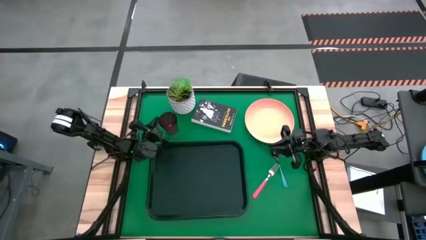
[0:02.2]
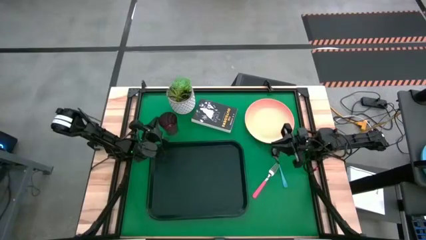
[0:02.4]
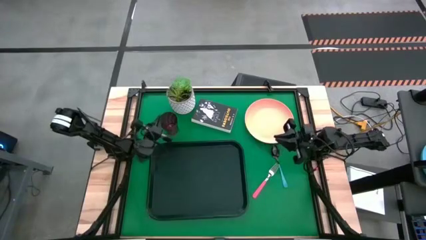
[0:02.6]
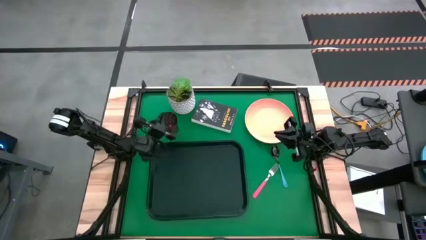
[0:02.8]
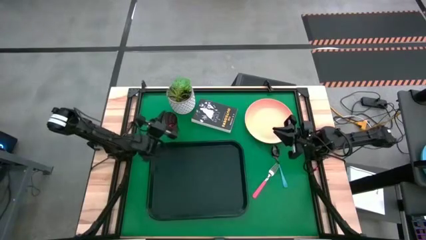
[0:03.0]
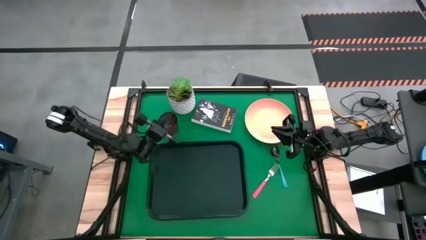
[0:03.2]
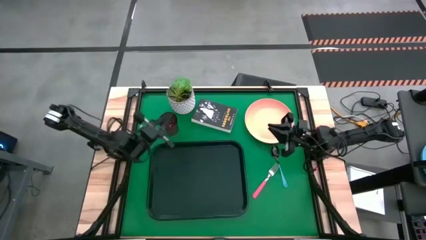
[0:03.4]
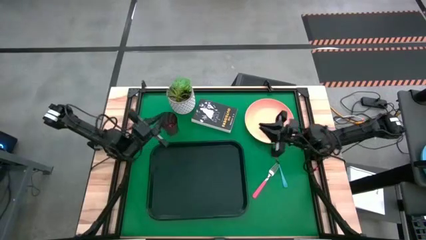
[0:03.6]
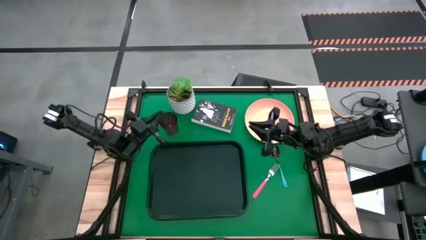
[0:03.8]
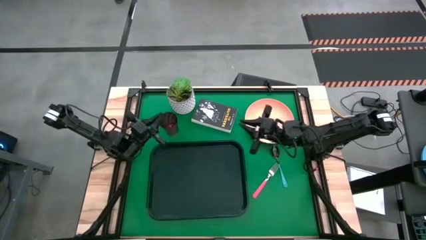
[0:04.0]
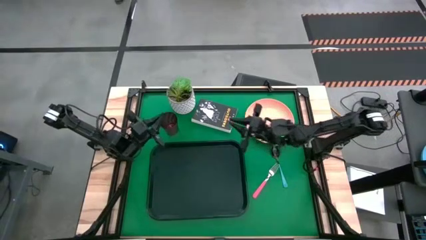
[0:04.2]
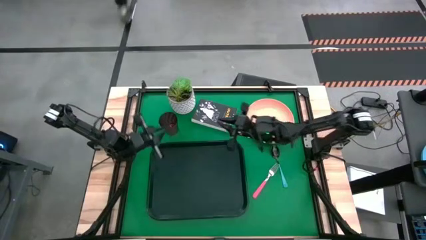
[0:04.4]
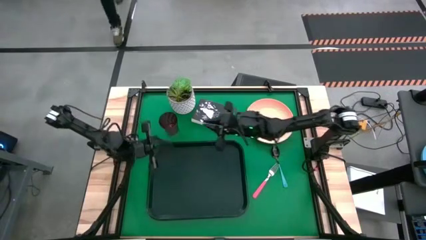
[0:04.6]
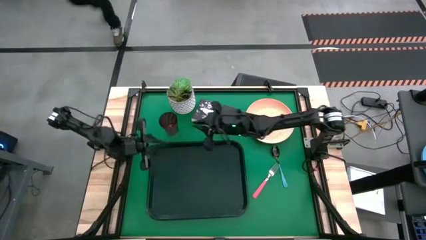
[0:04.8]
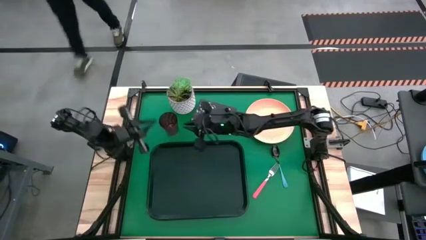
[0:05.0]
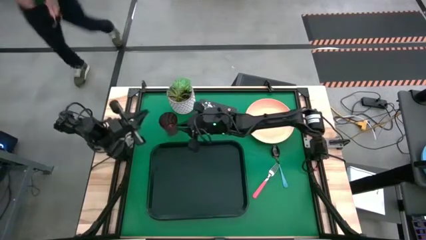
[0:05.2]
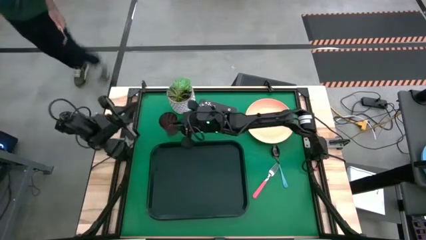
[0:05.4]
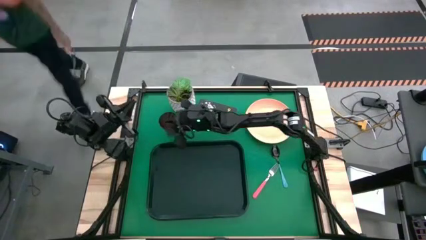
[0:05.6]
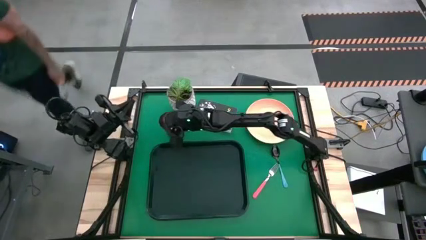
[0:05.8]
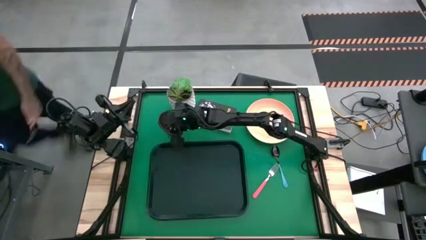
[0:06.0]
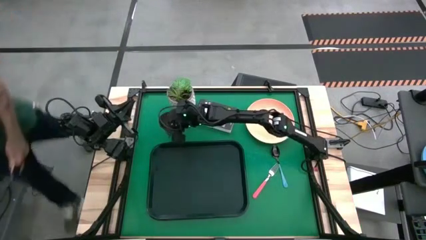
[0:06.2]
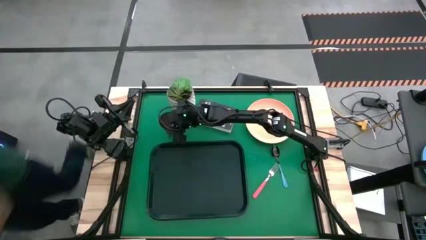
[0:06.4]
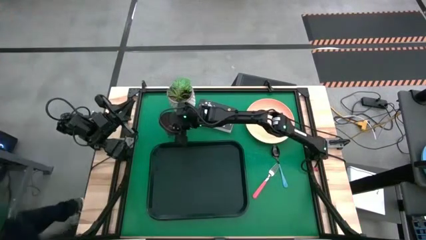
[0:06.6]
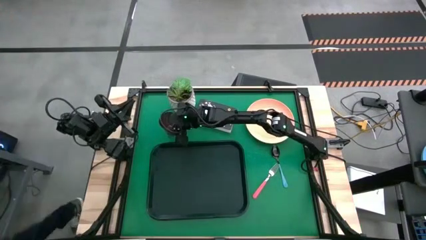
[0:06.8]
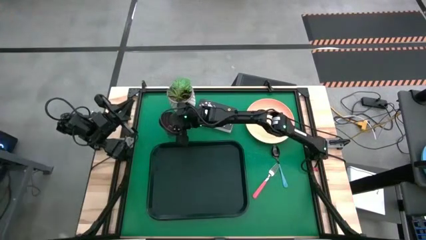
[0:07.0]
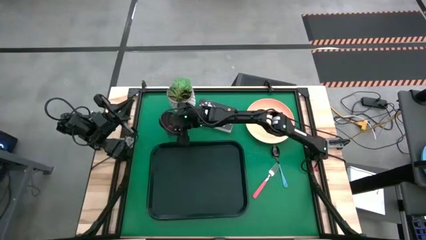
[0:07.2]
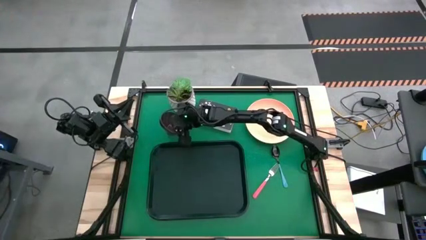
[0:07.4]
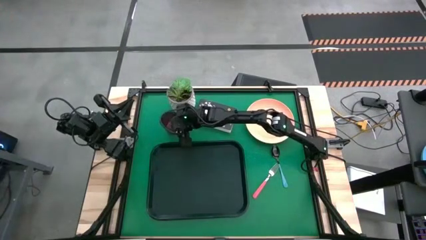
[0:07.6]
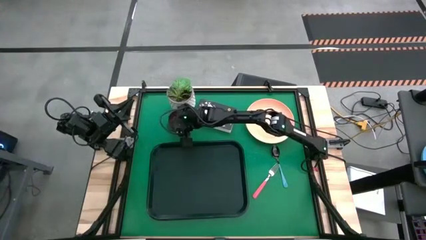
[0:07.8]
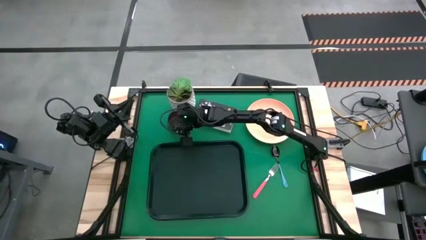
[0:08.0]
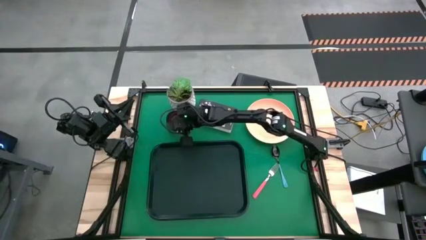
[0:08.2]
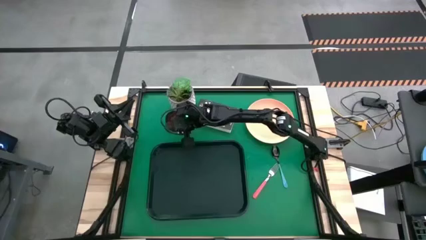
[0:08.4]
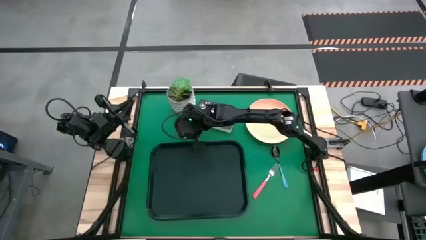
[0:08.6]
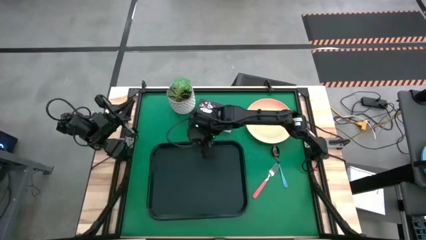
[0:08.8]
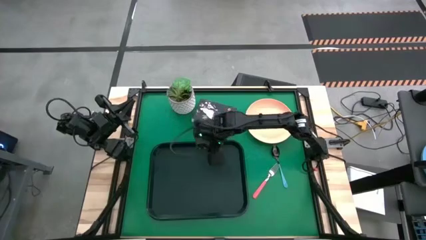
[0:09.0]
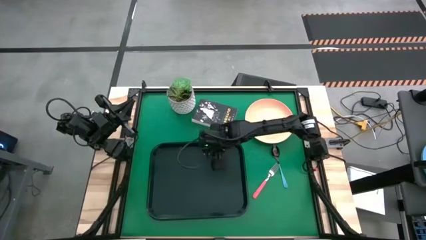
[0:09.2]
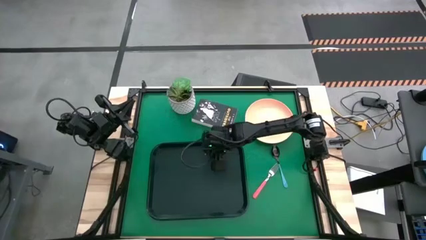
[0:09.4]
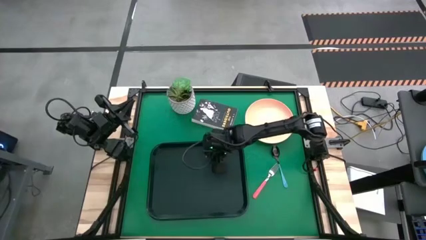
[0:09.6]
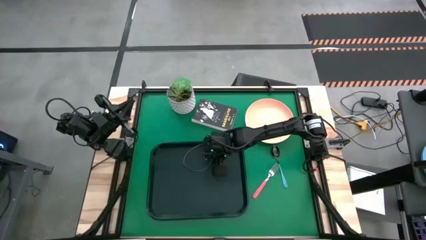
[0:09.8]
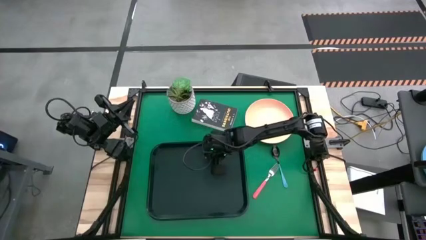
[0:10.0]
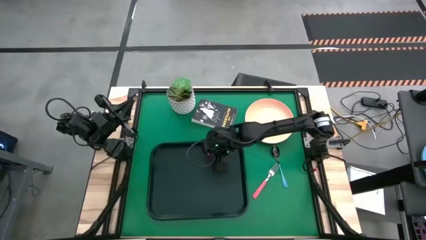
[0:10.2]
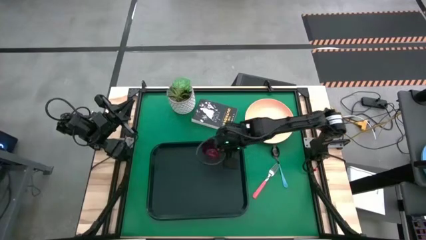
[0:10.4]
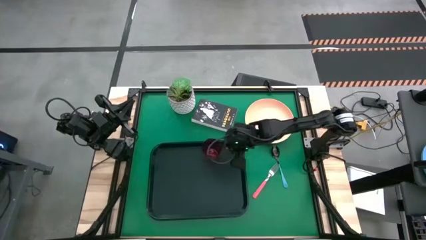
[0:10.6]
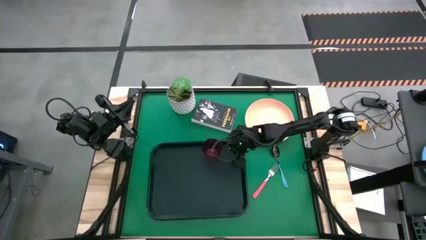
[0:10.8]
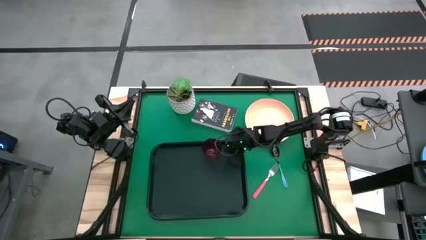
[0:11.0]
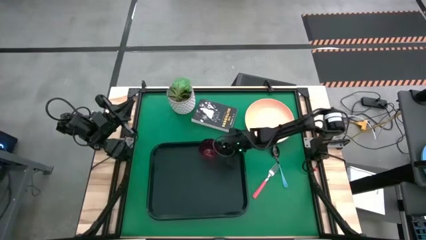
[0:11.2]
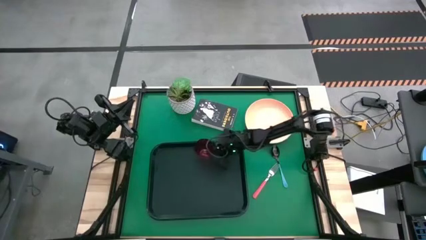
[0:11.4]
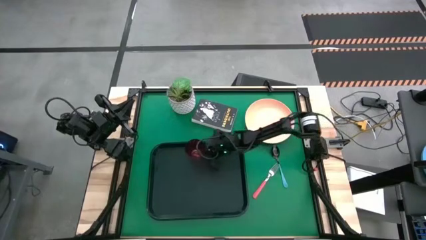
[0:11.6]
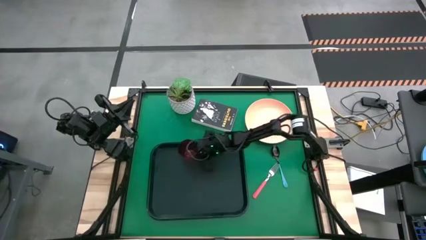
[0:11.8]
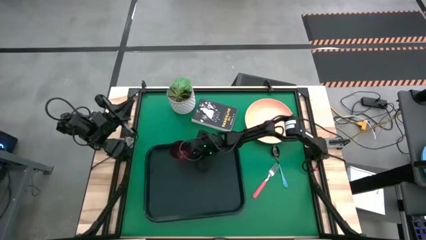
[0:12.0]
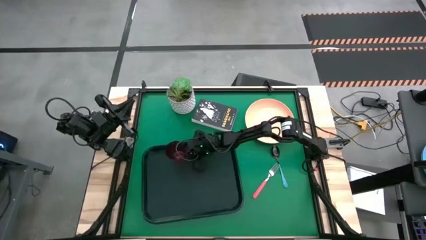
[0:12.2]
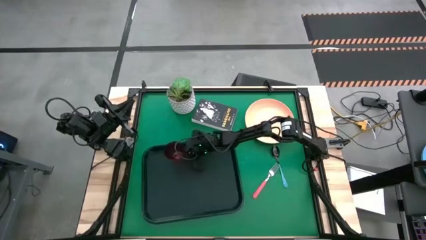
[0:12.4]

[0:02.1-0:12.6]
Task: Pick and place plate/cup/fork/spoon on tray
Put the red cup on the black table tray

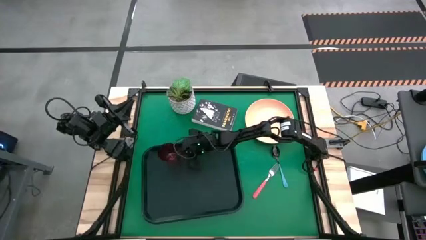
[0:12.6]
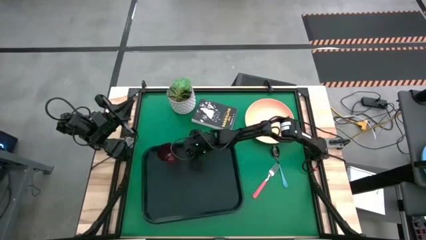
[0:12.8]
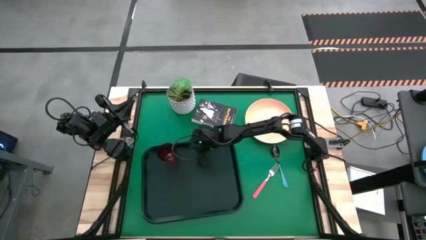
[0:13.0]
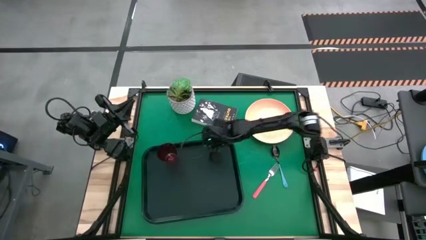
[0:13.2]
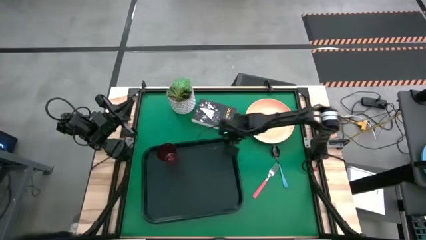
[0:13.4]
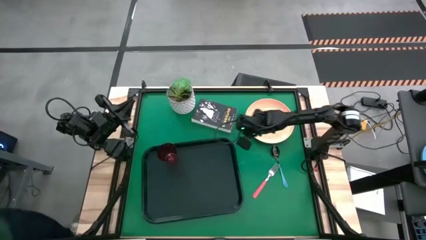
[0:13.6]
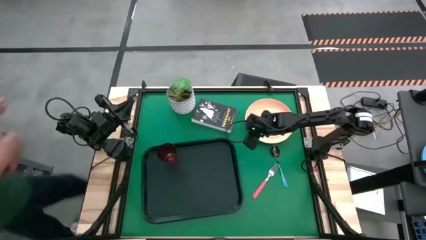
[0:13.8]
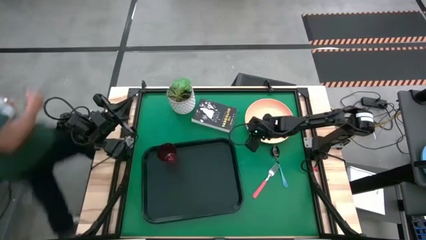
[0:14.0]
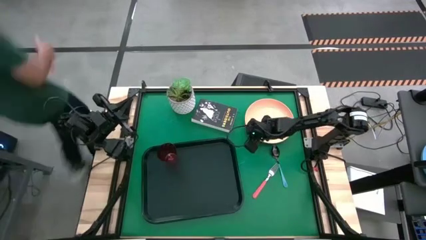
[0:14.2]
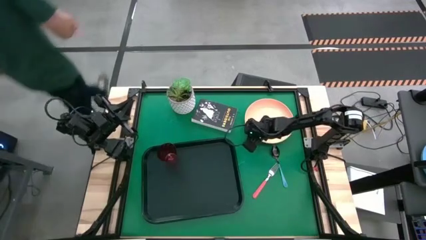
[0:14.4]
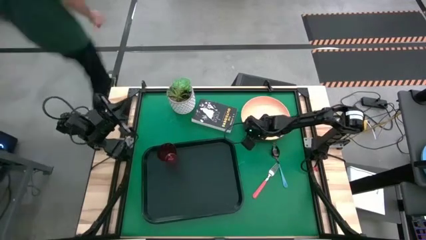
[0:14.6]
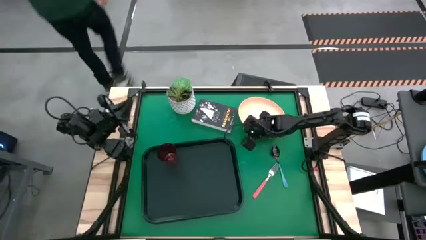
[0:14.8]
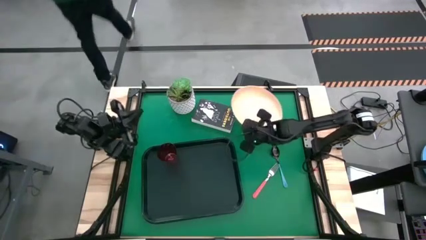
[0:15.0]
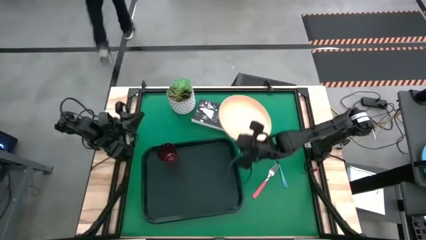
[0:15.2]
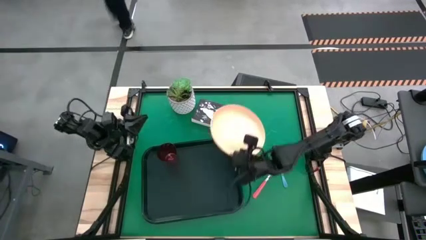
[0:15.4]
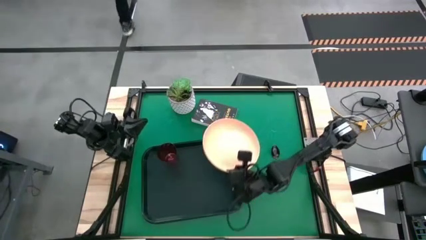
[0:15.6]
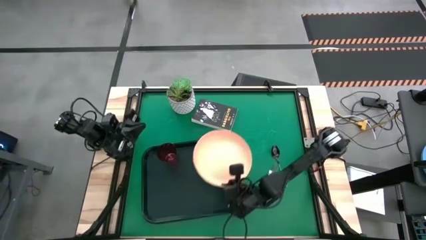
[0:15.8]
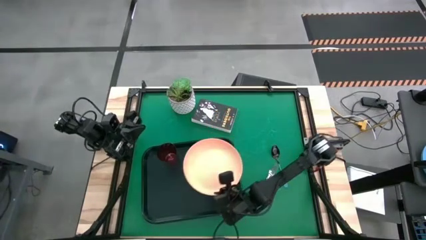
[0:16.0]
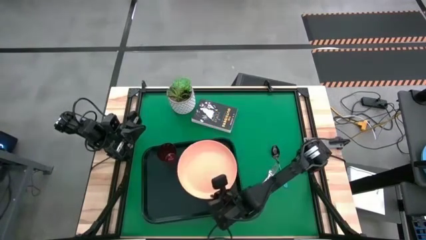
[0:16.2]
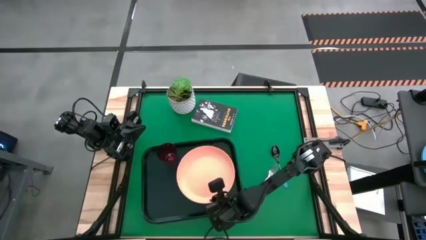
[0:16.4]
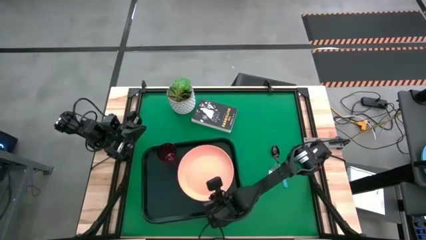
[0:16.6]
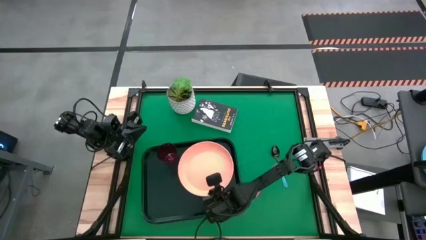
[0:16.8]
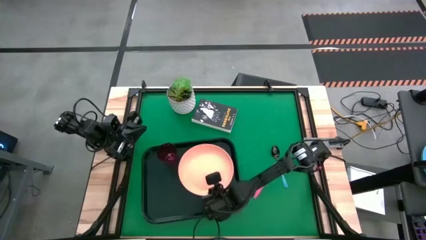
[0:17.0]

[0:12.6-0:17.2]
Put the orange plate on the black table tray to the right of the red cup
